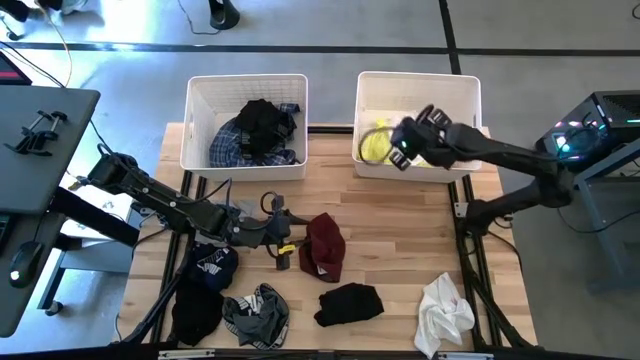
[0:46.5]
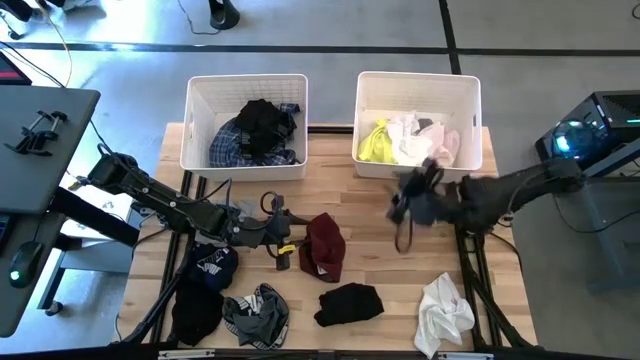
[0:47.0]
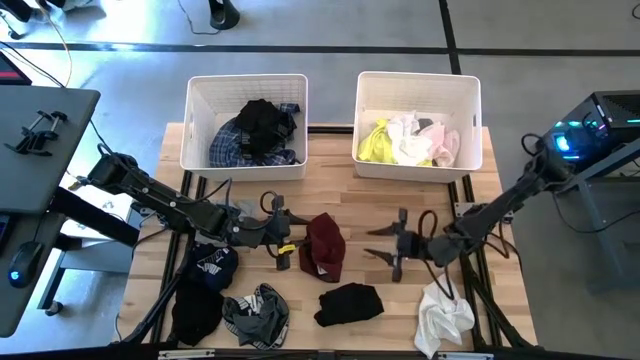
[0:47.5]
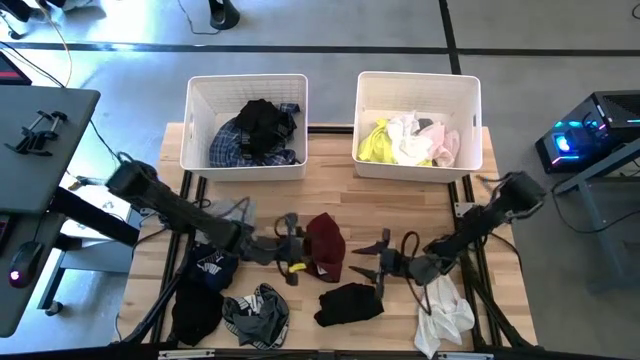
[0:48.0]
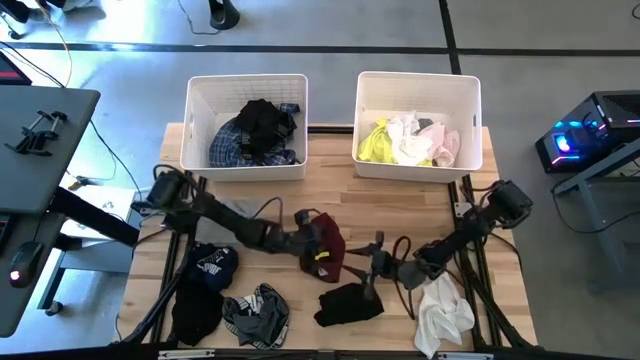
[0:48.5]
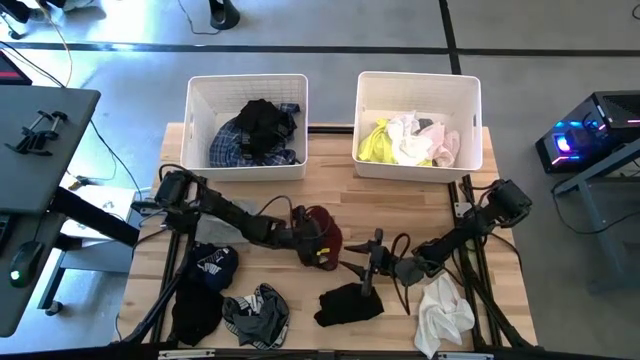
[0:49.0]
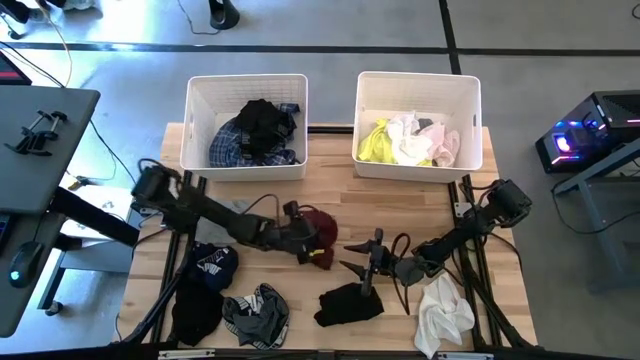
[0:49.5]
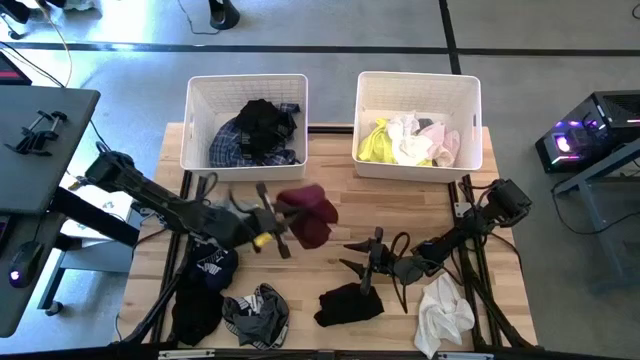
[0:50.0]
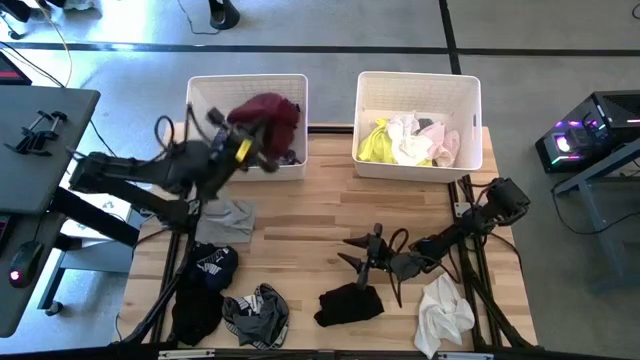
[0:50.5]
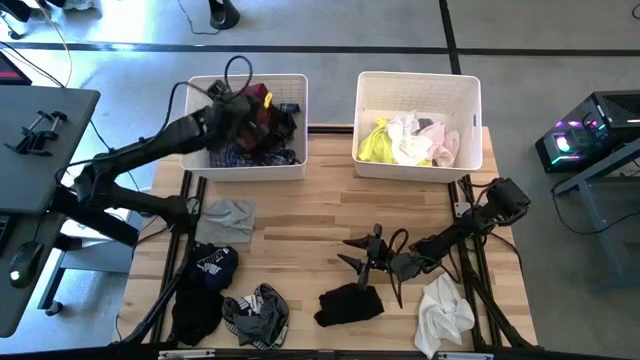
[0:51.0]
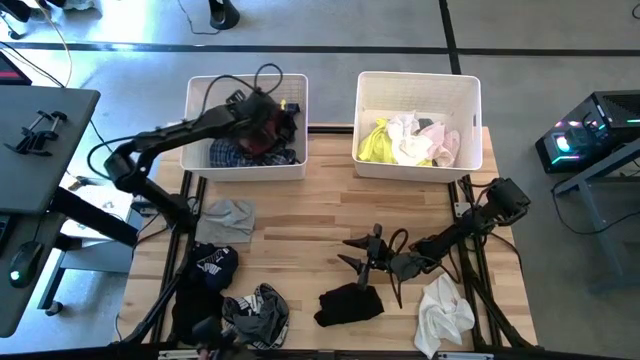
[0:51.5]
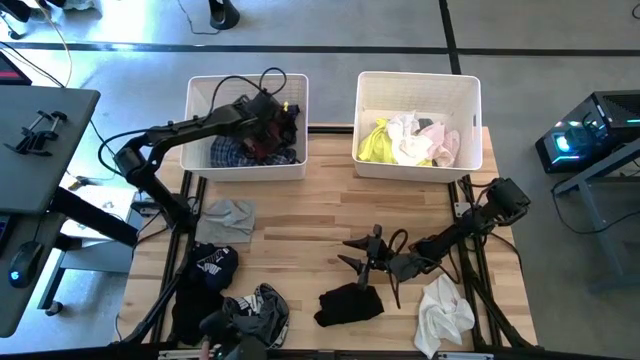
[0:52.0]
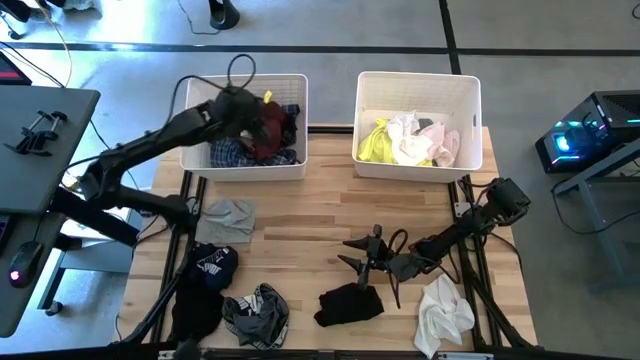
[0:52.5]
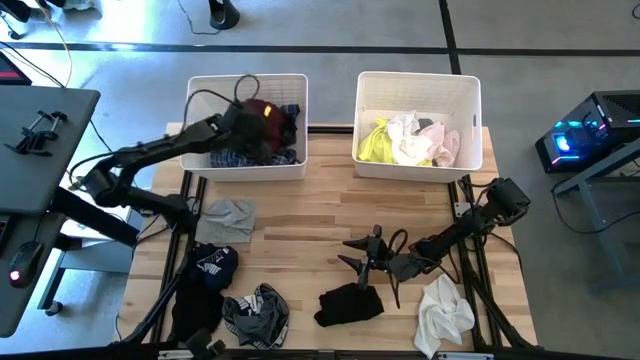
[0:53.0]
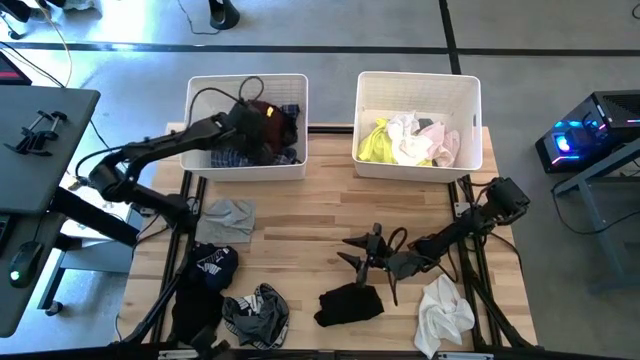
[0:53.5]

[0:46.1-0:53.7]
Task: Sort clothes
Put the red underwear into the left white bin

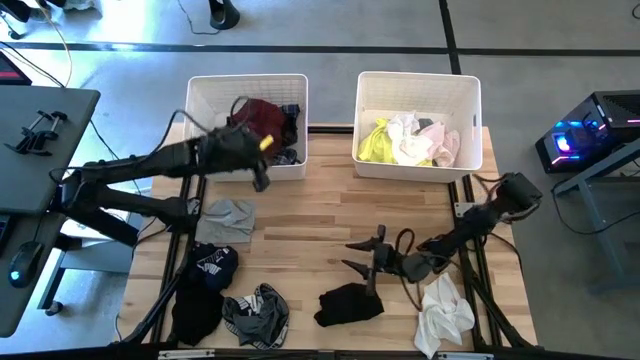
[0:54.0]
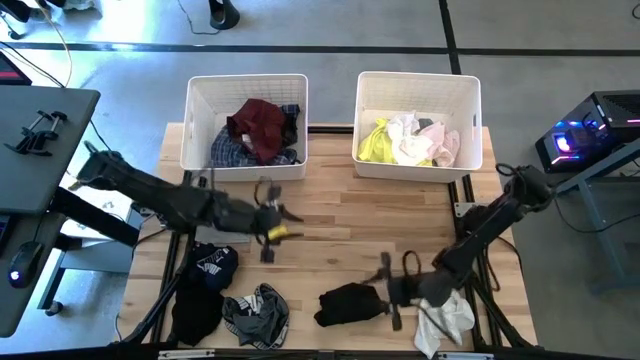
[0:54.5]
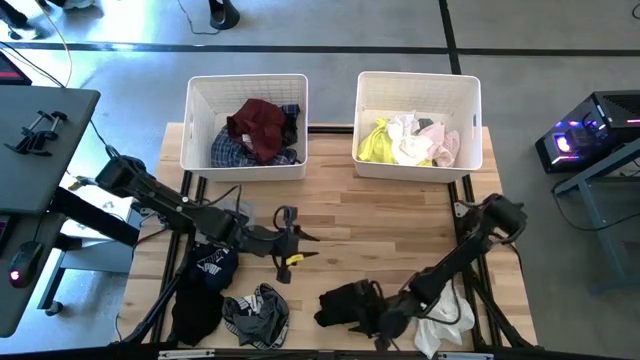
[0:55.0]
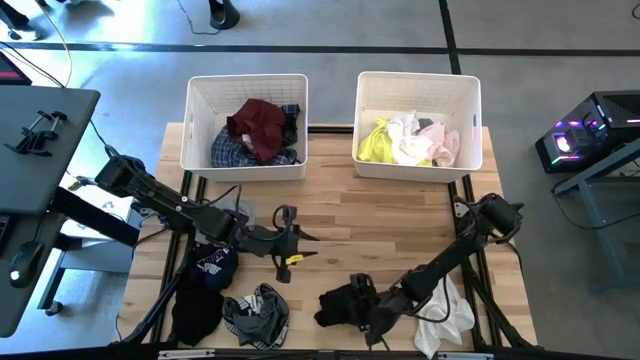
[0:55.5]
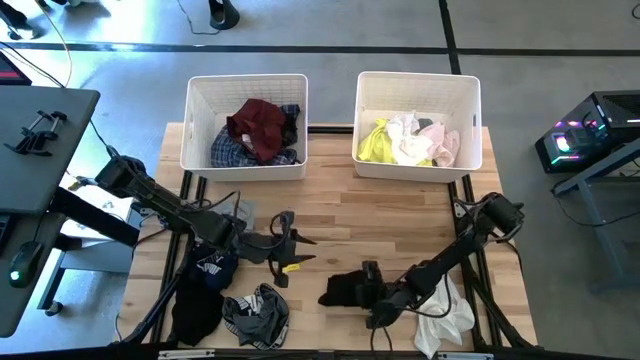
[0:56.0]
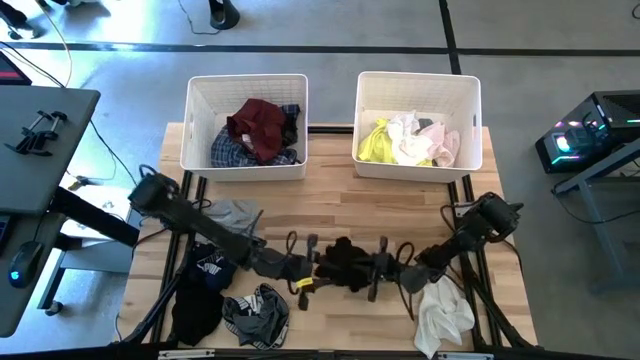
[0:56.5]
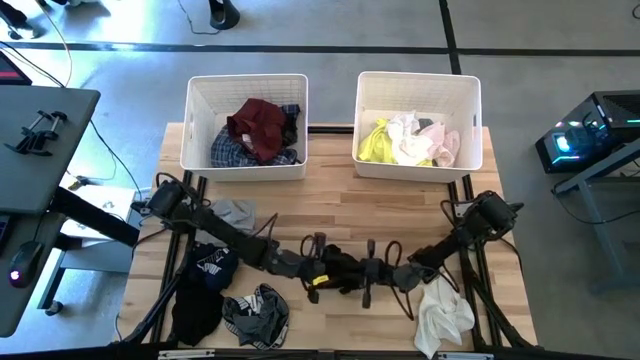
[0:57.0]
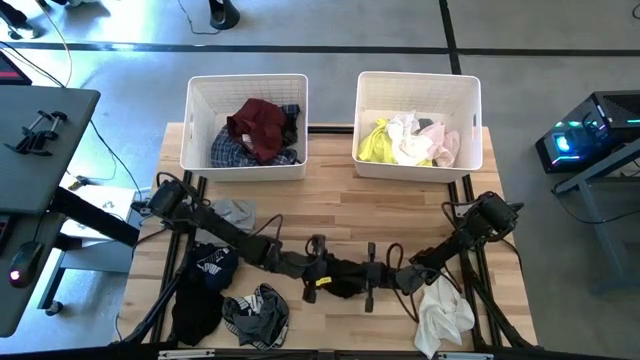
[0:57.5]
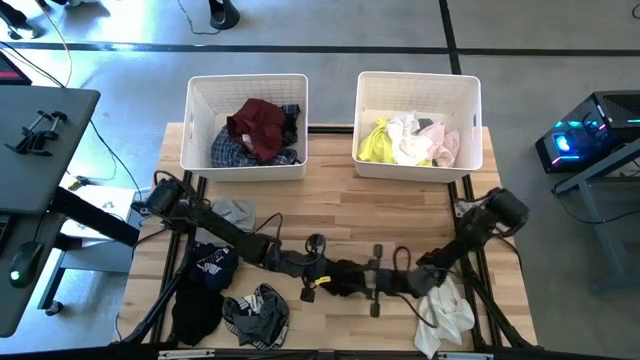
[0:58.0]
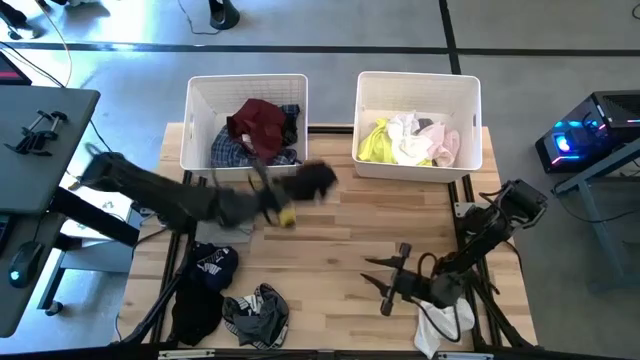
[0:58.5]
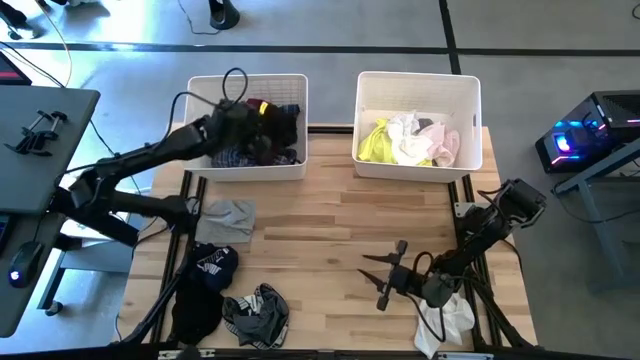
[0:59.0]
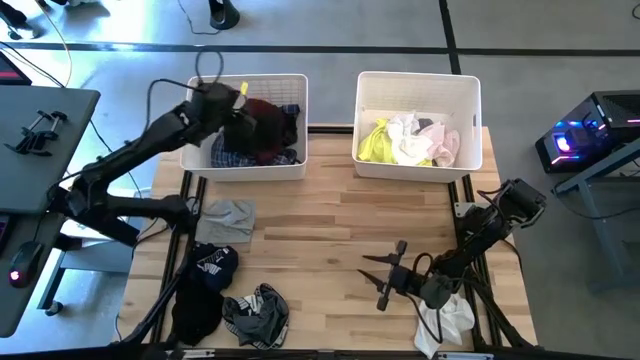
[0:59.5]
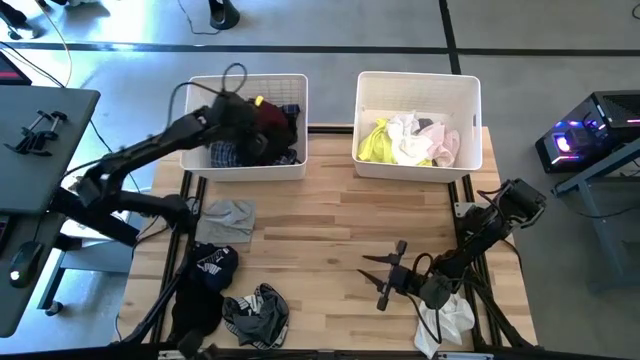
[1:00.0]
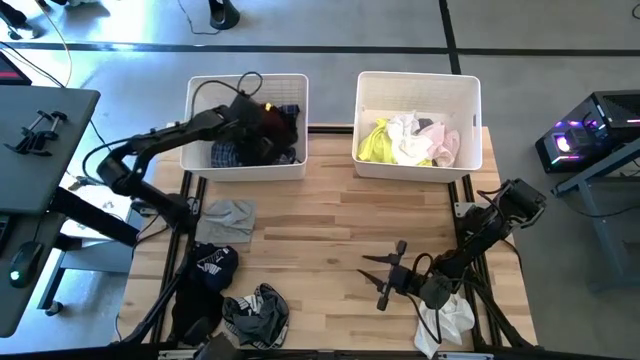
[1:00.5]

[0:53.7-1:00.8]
Put the right black shorts into the left white bin

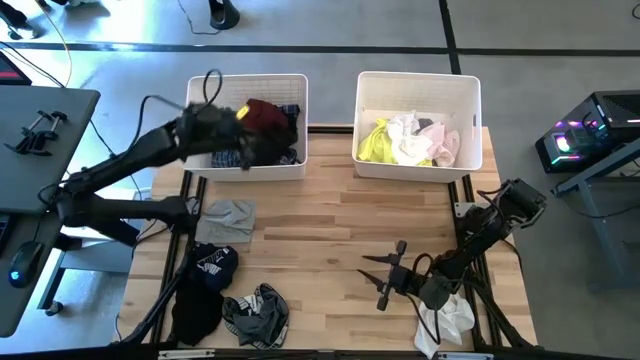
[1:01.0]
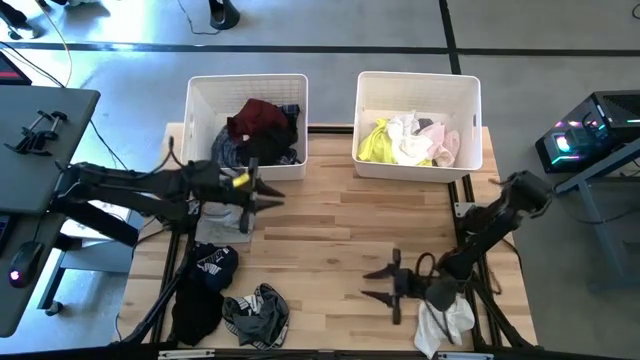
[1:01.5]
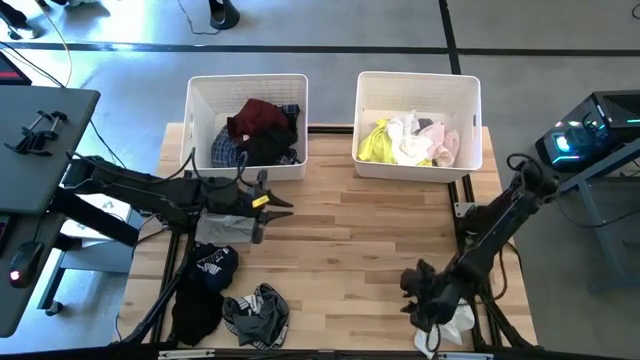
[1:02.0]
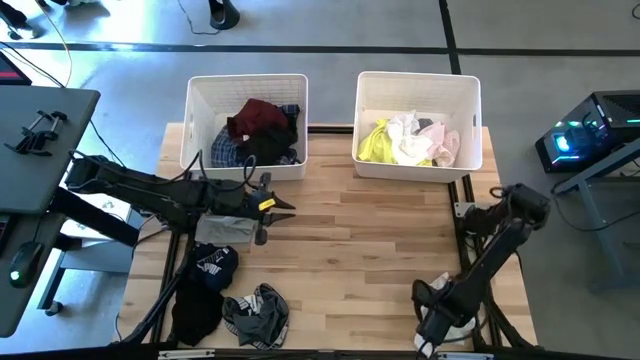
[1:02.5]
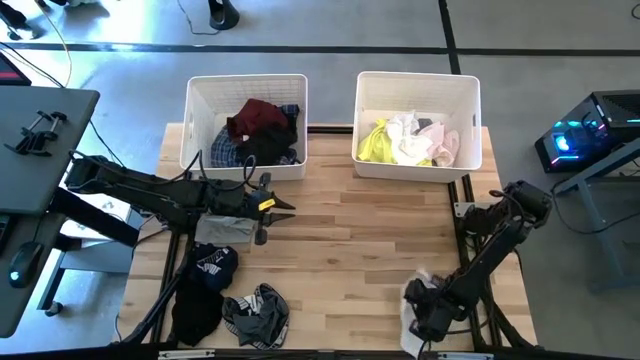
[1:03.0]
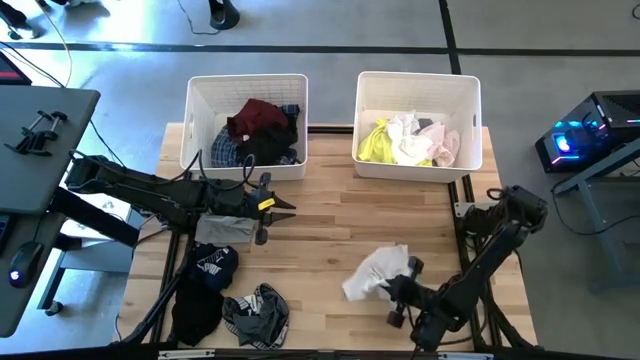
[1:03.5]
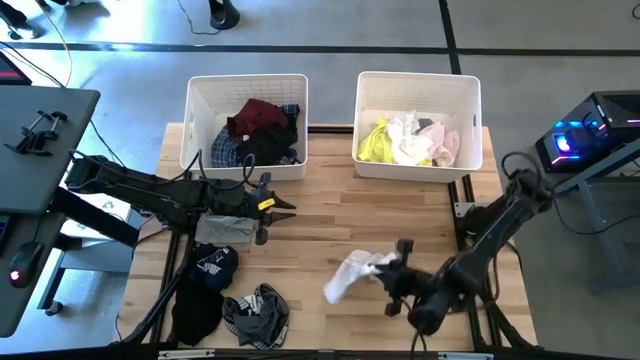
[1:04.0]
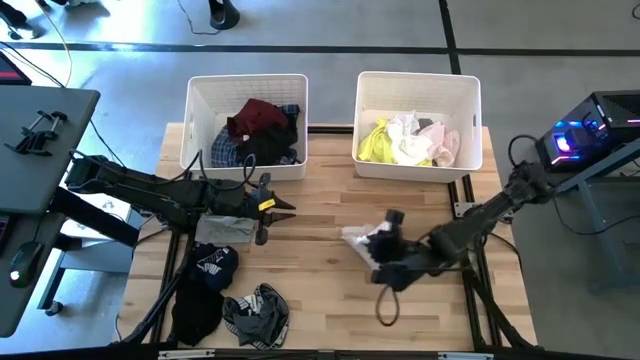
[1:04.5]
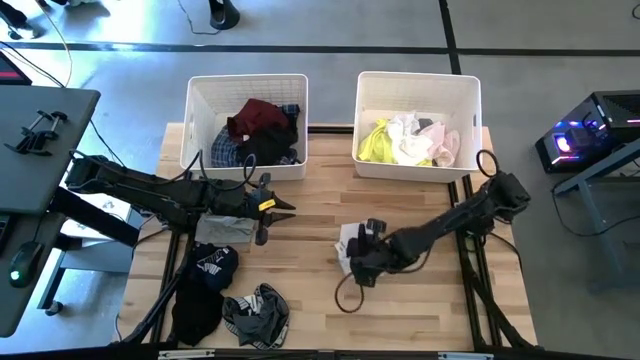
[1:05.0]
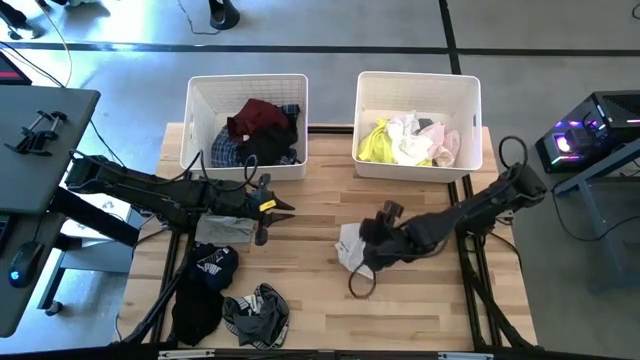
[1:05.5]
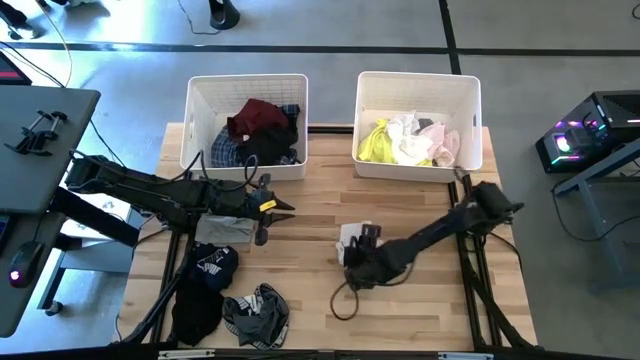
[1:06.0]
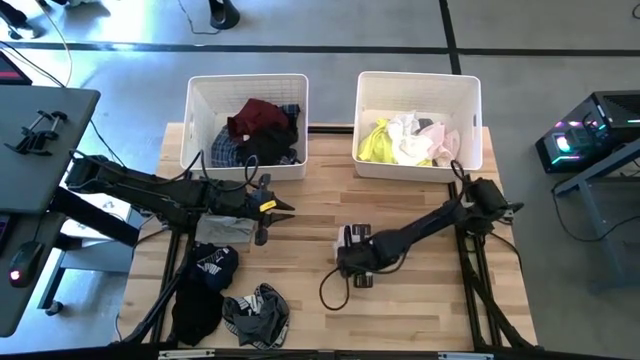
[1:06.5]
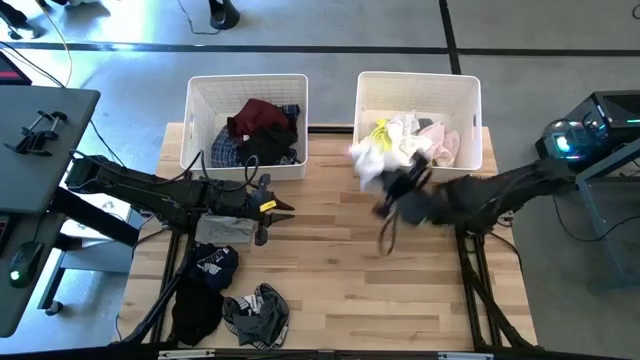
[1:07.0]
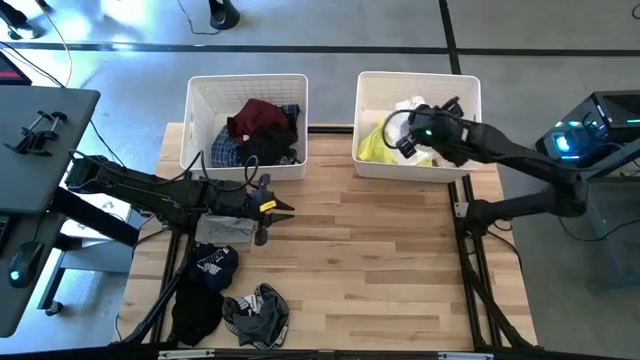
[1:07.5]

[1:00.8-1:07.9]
Put the white shorts into the right white bin
